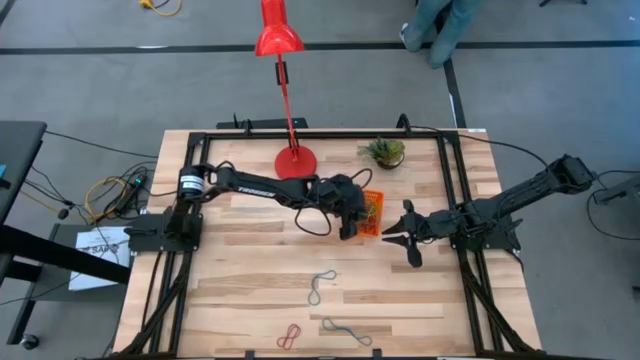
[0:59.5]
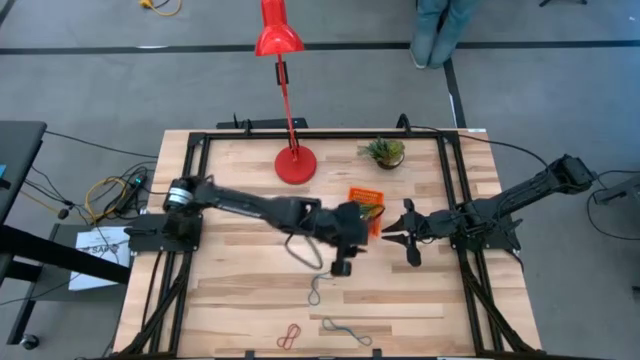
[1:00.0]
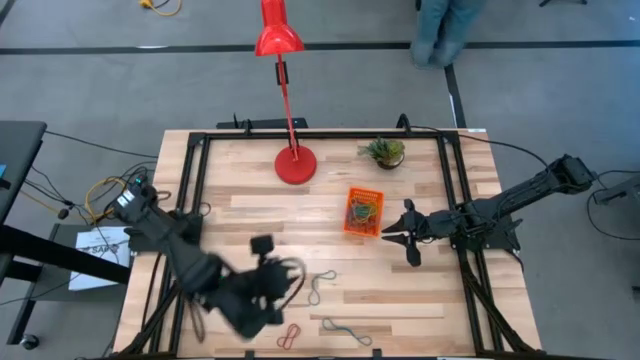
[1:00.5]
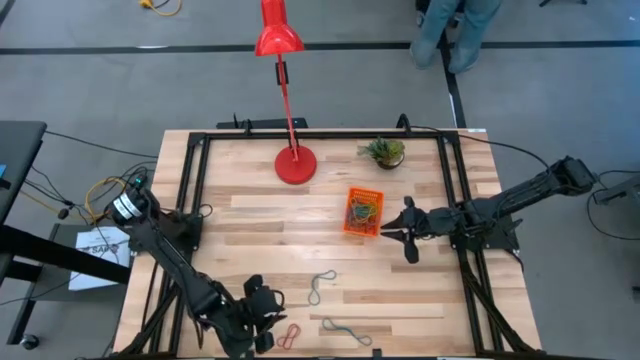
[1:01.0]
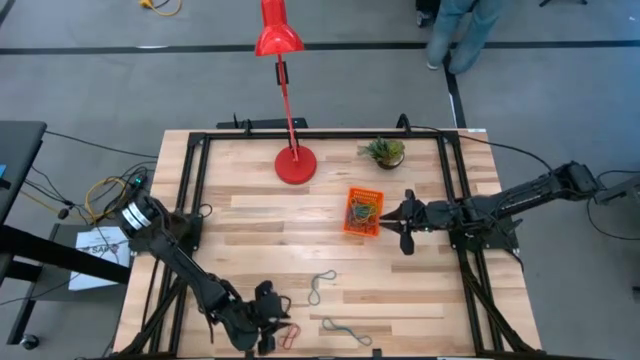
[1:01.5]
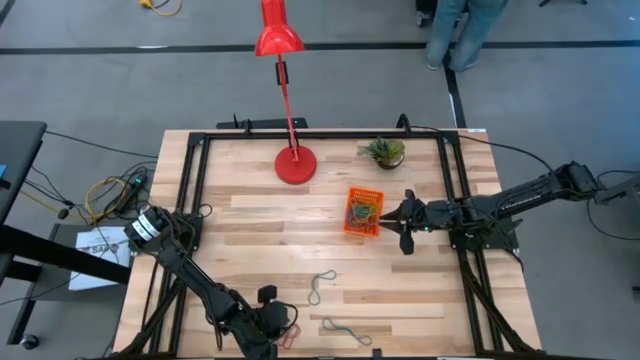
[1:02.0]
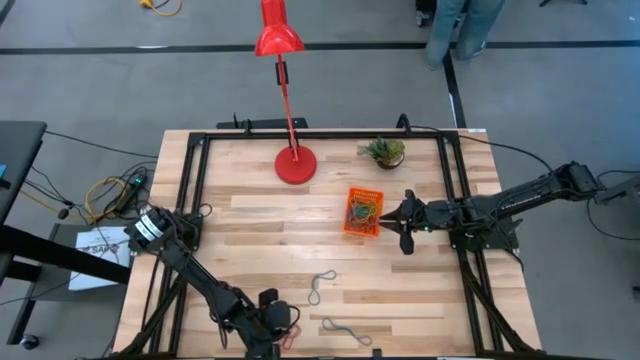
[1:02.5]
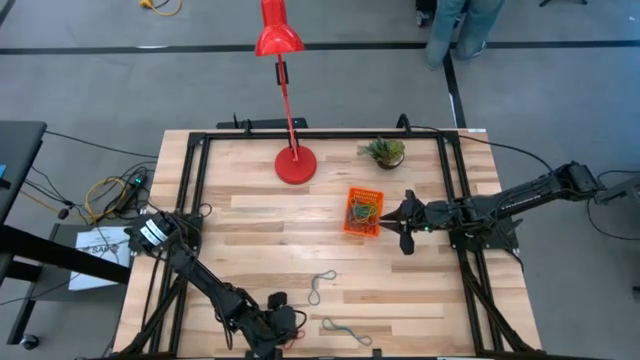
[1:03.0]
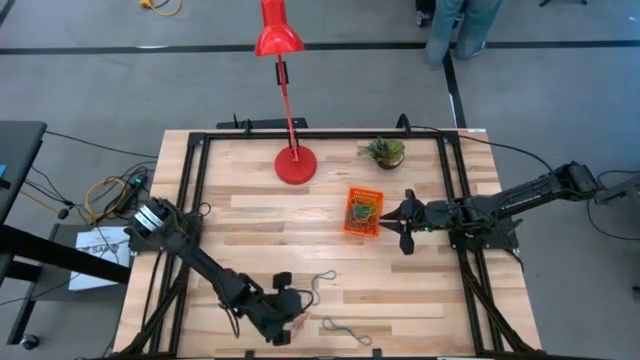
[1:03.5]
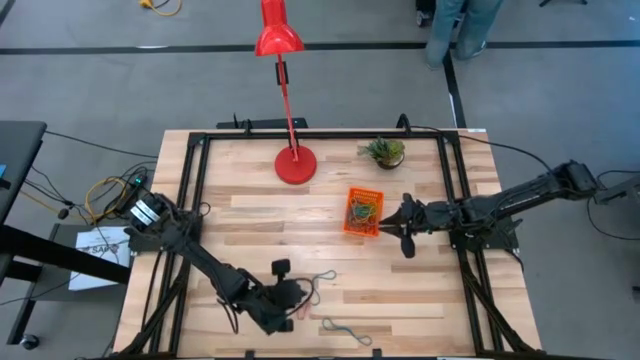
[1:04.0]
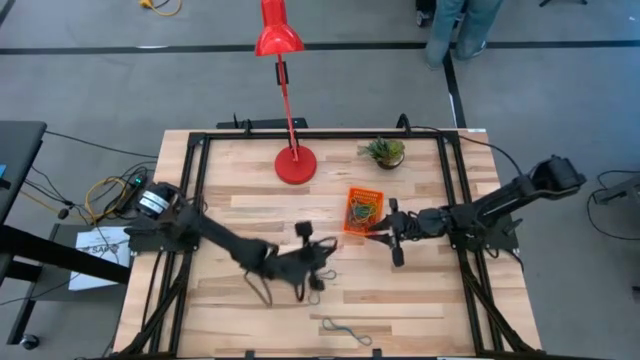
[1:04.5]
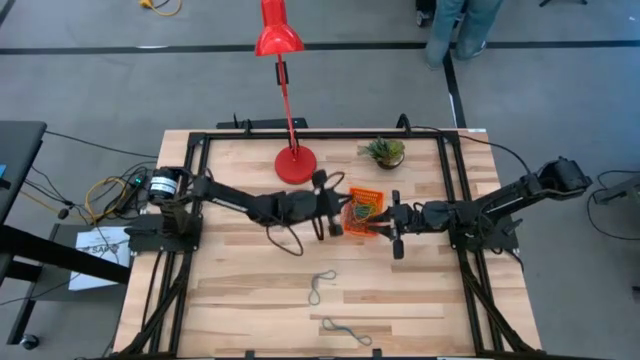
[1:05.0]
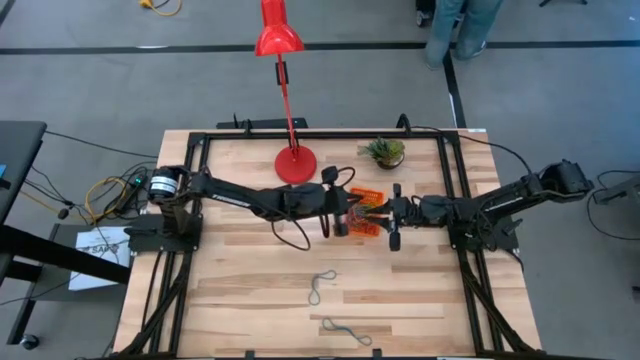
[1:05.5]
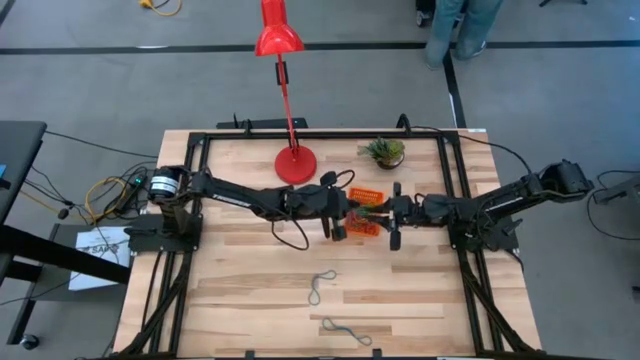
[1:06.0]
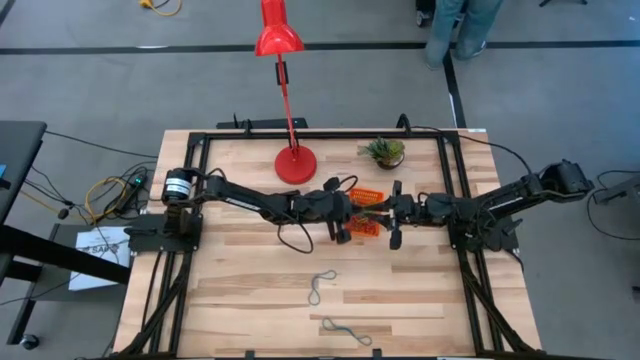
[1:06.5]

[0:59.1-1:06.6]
Task: Pick and place items into bin
Put the red rubberband into the orange basket

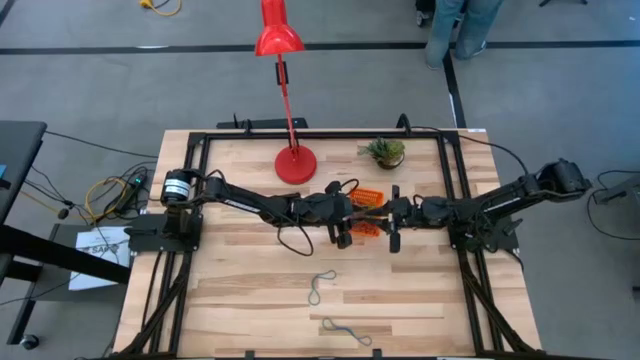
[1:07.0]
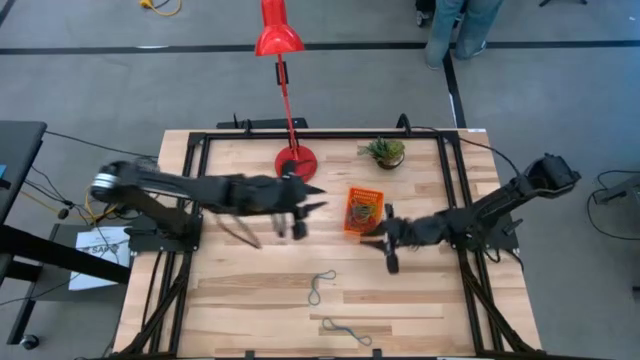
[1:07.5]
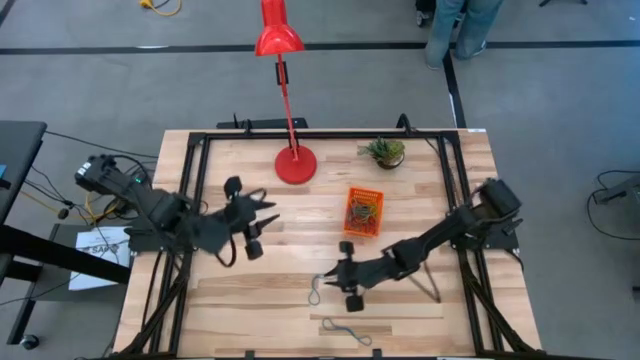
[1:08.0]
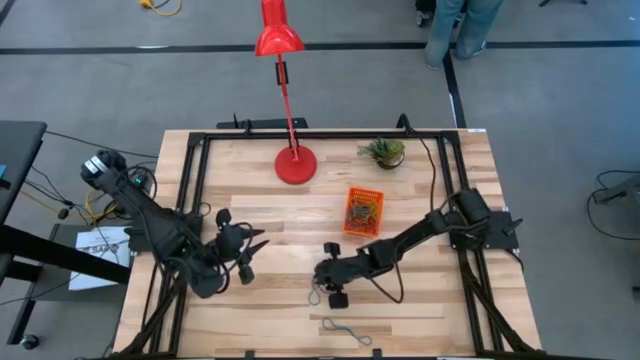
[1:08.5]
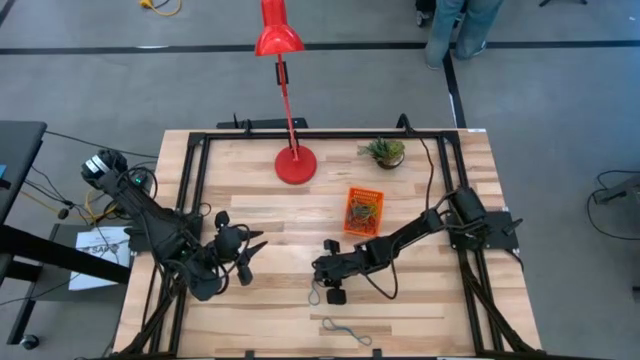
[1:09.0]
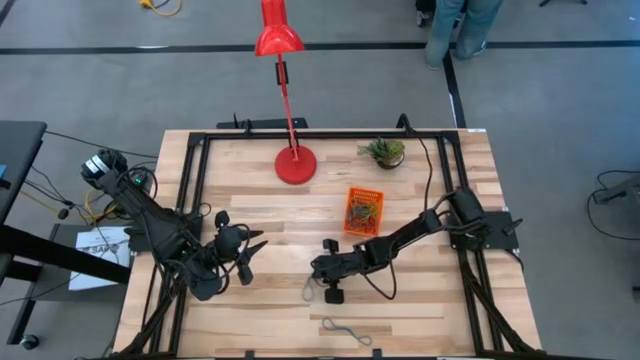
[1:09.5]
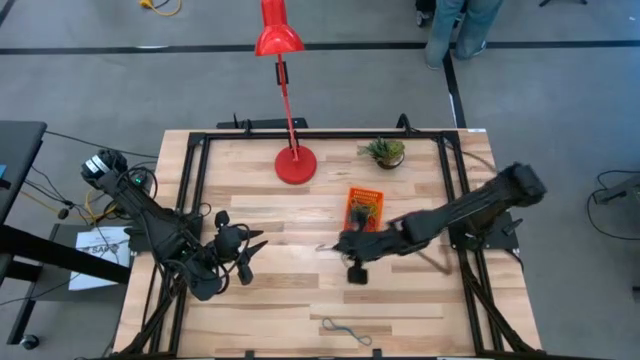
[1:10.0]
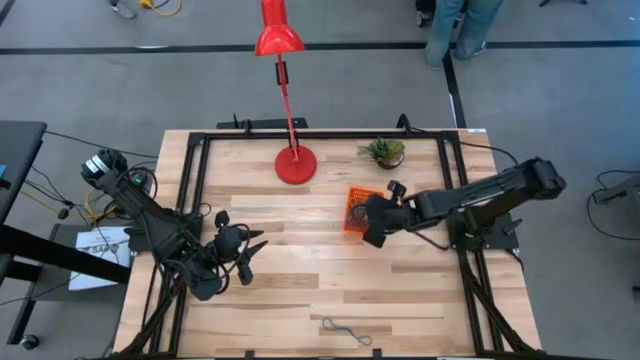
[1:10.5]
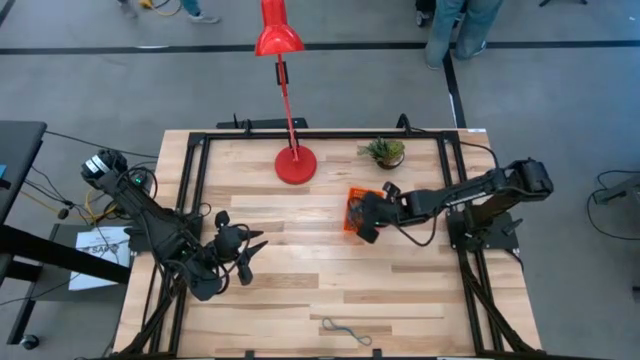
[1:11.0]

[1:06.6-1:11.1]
Put the top blue rubberband into the orange basket

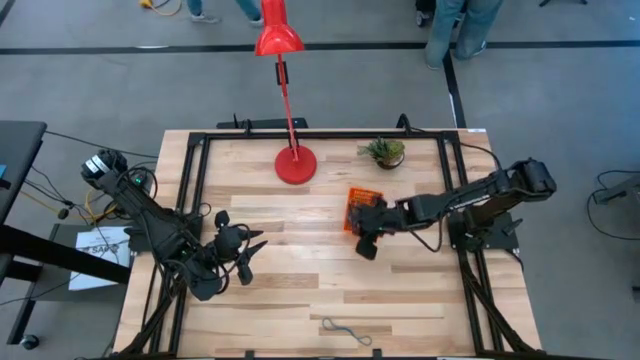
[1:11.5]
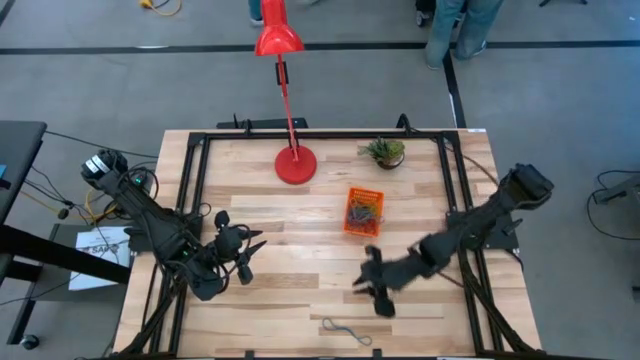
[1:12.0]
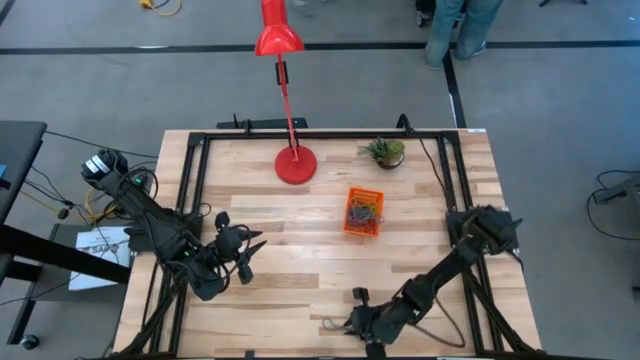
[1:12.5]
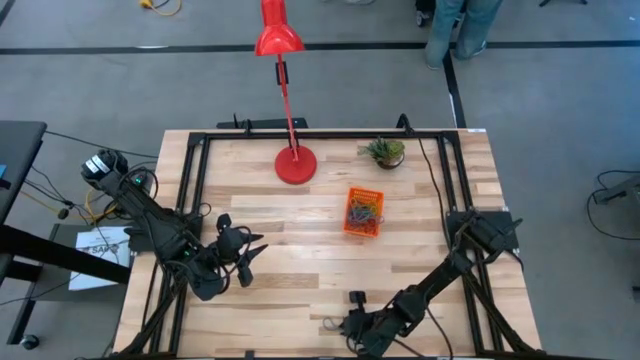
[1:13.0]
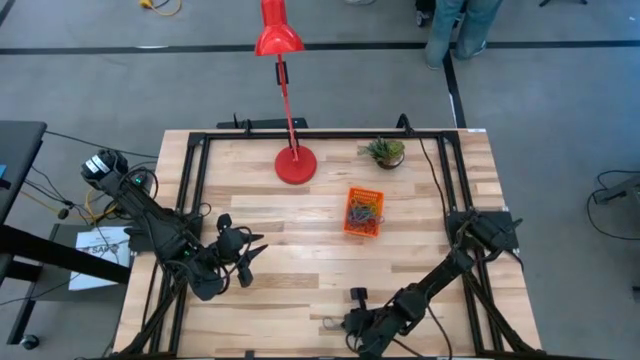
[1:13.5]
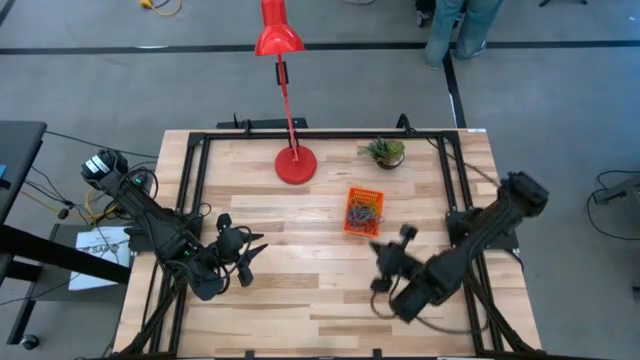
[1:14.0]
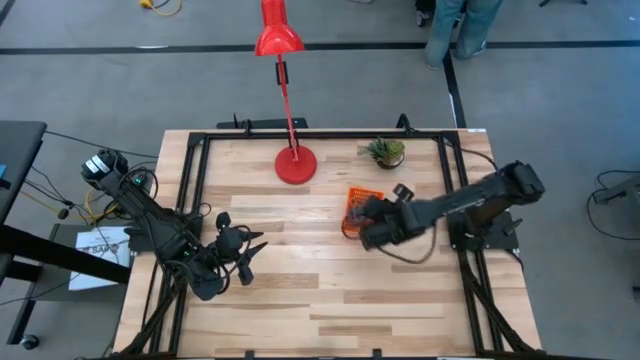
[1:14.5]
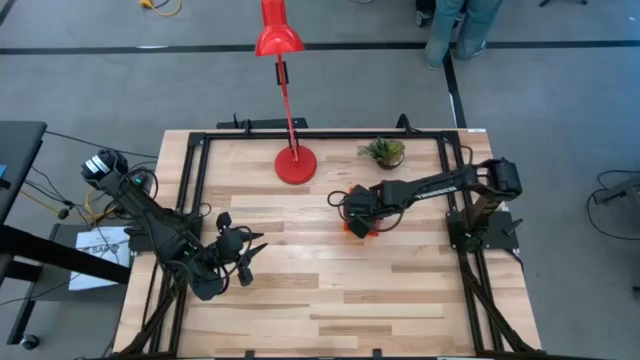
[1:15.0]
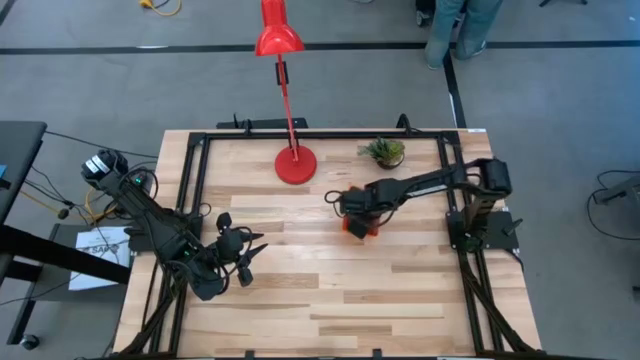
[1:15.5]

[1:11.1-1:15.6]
Put the blue rubberband into the orange basket

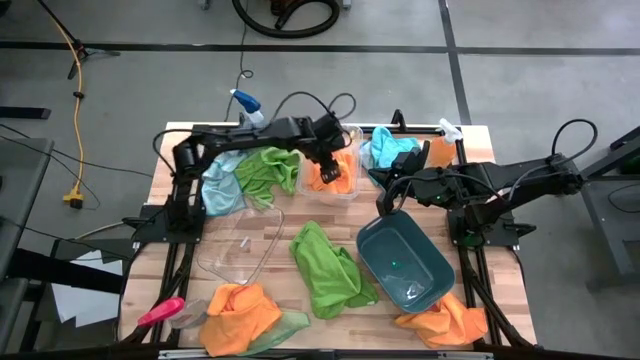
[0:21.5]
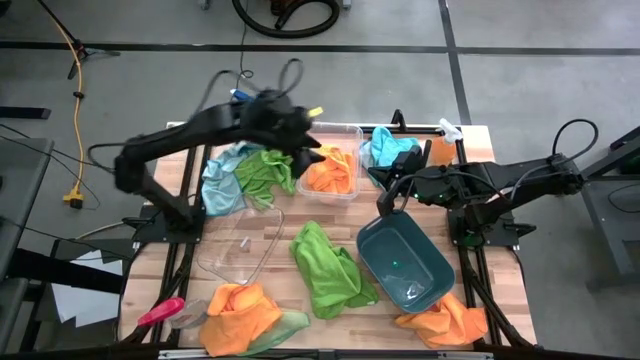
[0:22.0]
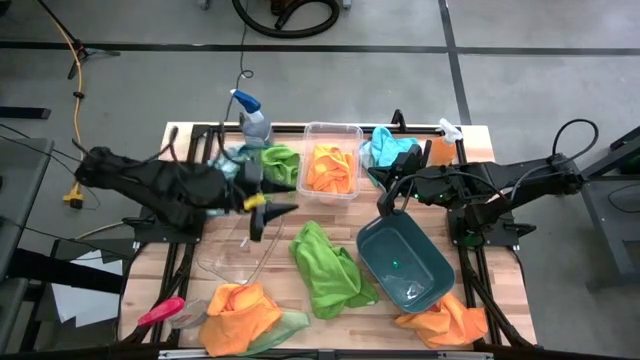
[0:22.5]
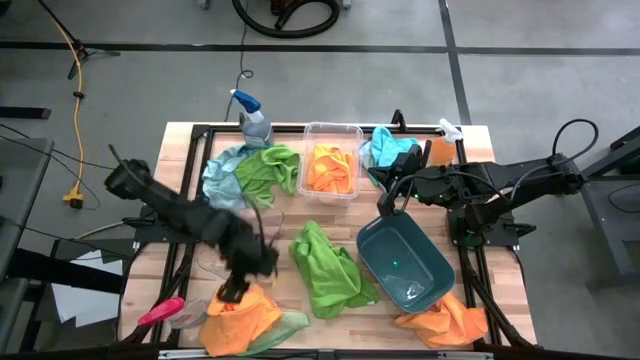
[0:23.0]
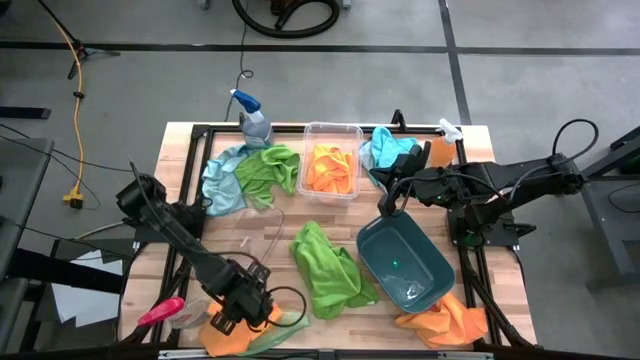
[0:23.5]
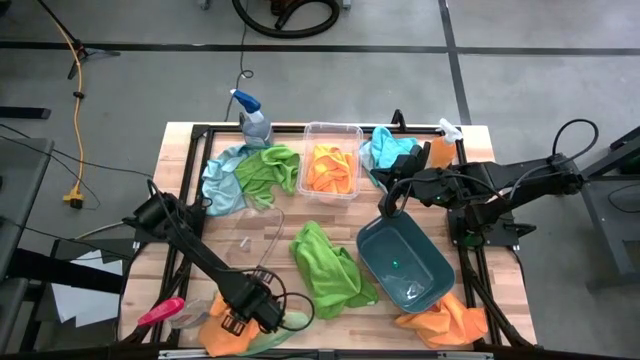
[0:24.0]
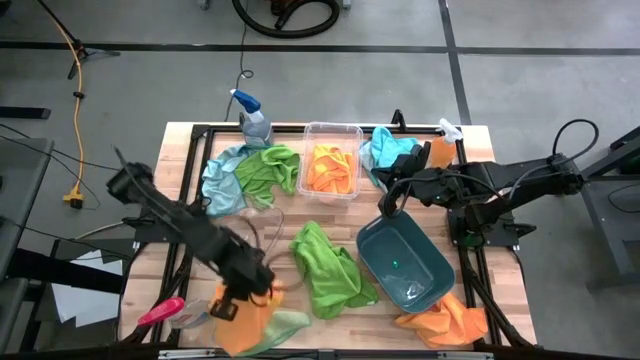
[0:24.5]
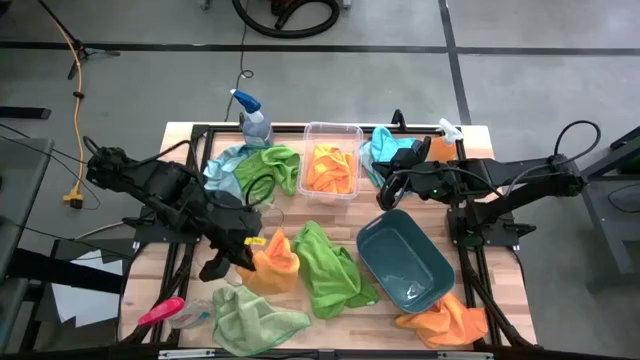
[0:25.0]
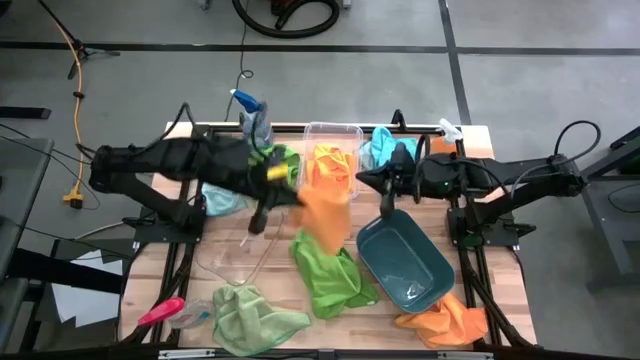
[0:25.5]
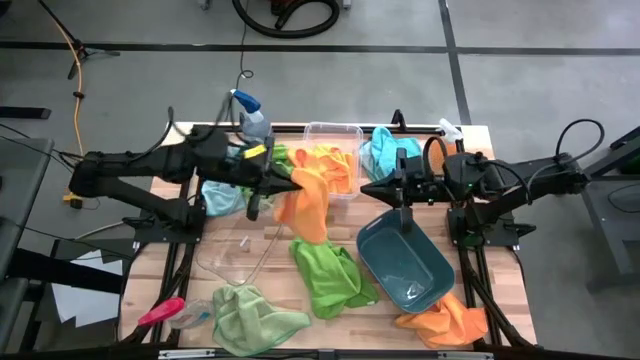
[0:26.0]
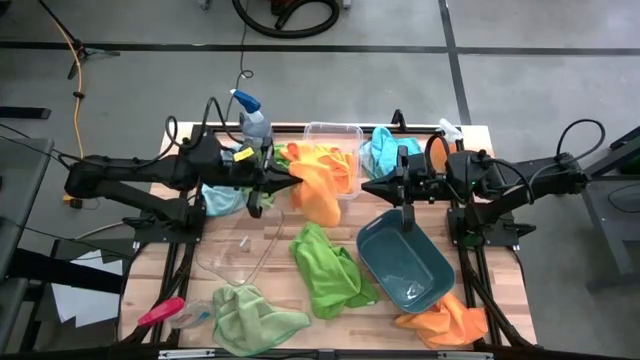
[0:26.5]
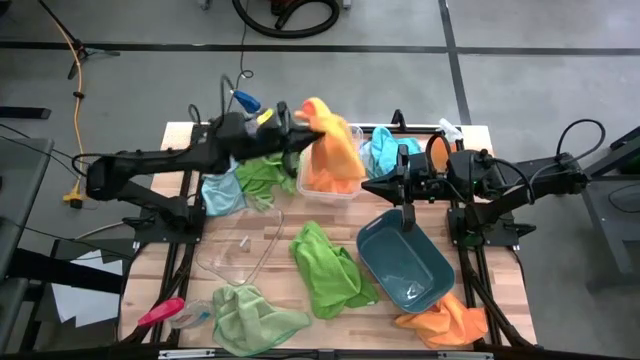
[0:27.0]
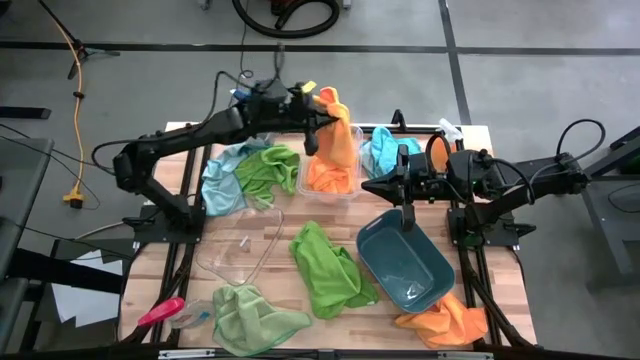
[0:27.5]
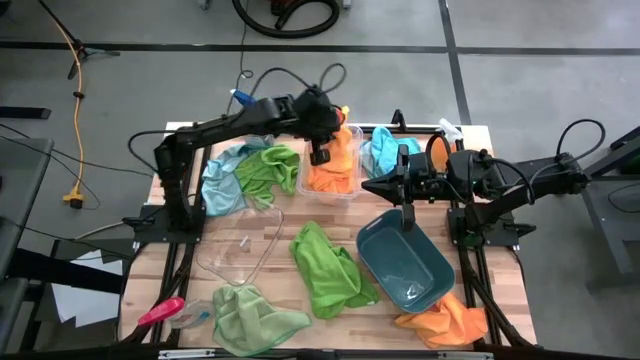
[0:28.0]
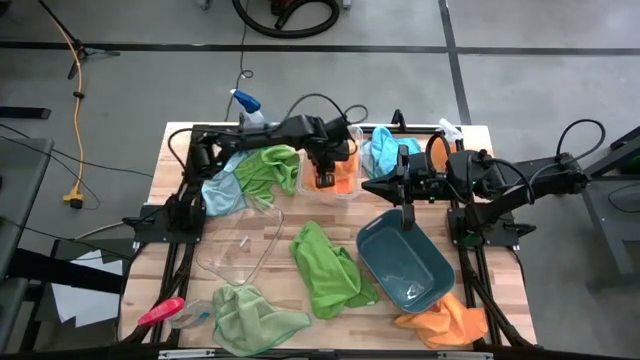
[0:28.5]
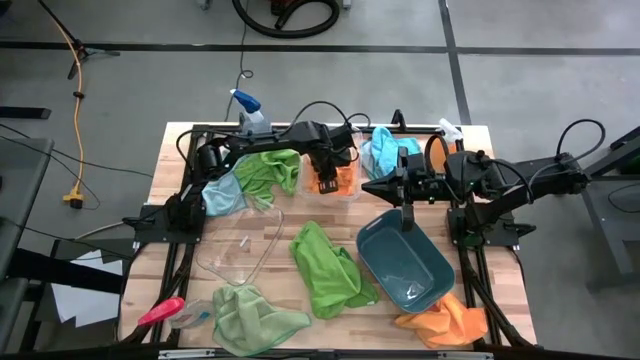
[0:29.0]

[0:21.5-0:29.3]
Task: Sort microfiber towel by color & place in baskets
Put the orange microfiber towel into the top transparent bin
